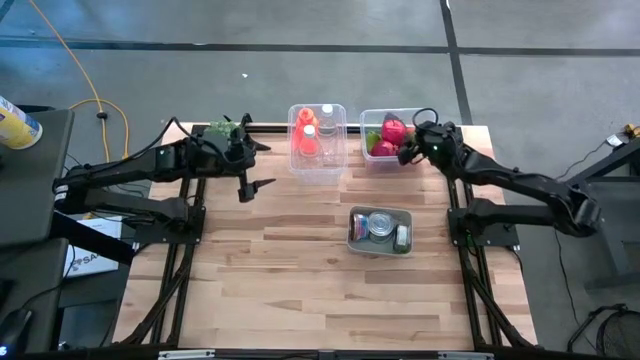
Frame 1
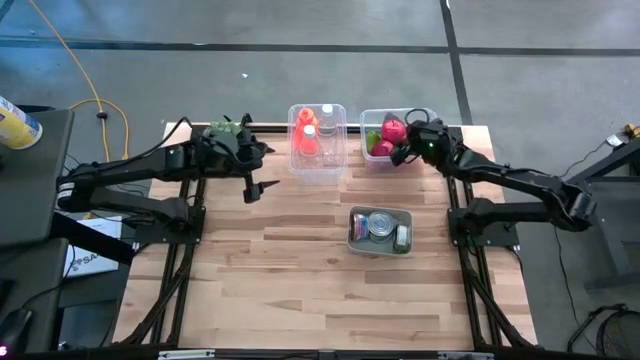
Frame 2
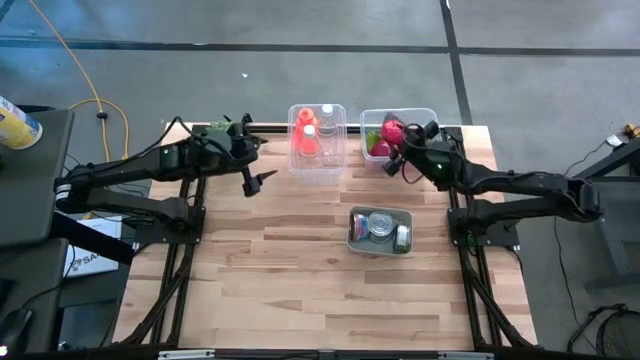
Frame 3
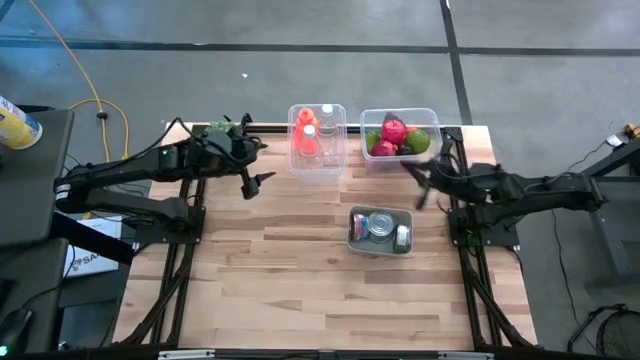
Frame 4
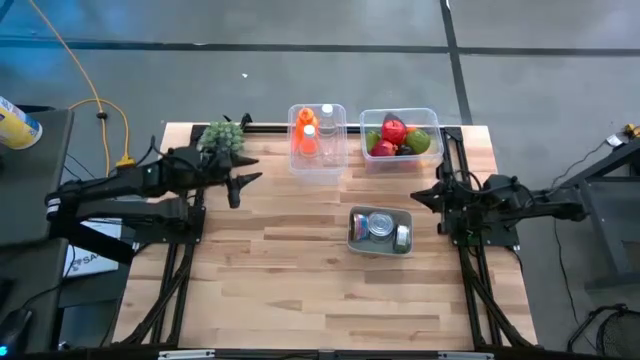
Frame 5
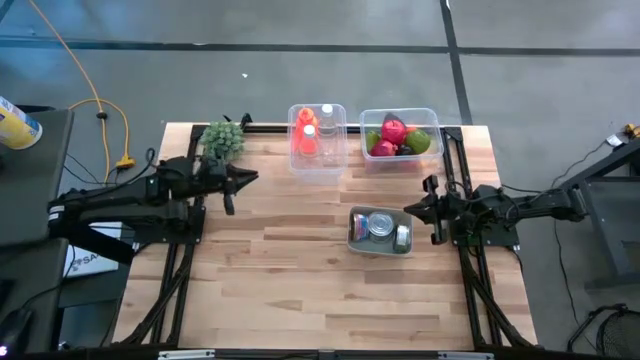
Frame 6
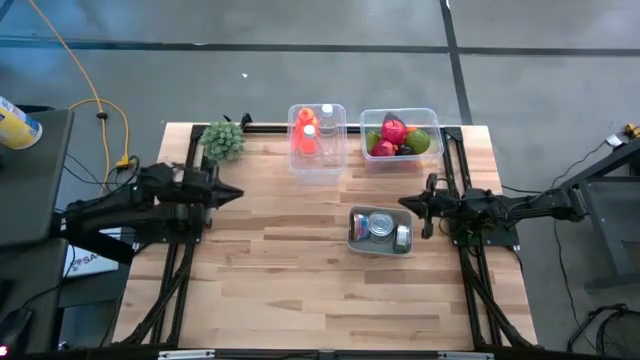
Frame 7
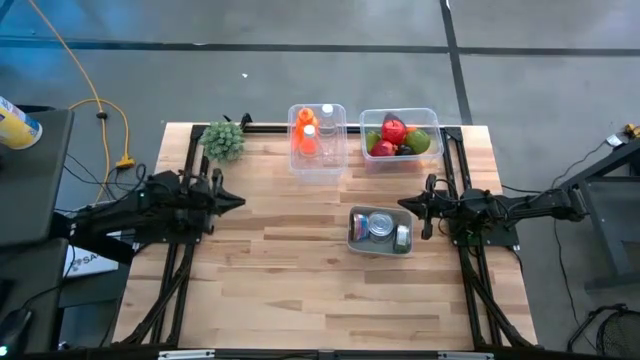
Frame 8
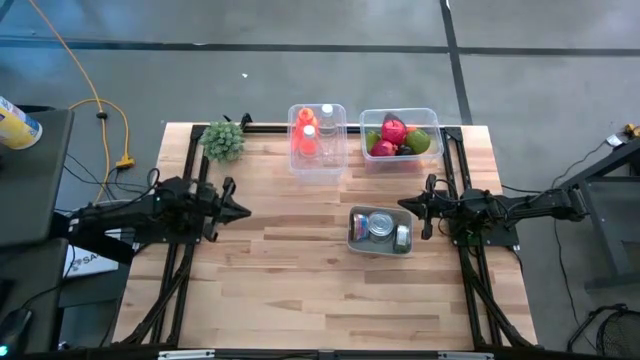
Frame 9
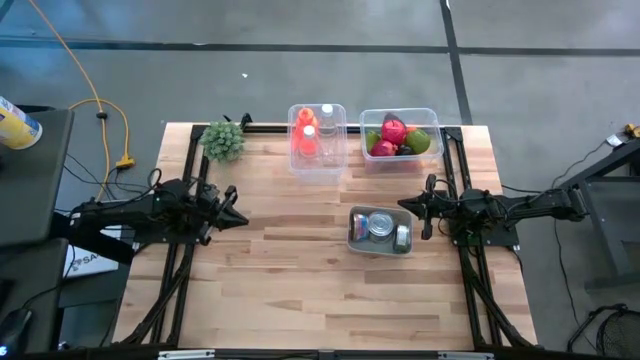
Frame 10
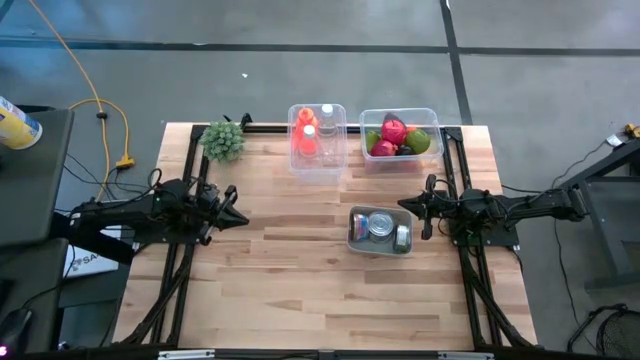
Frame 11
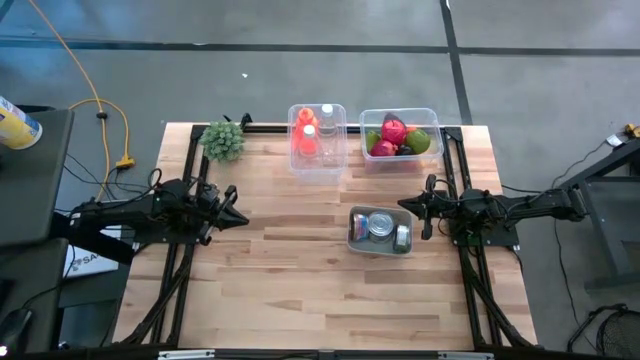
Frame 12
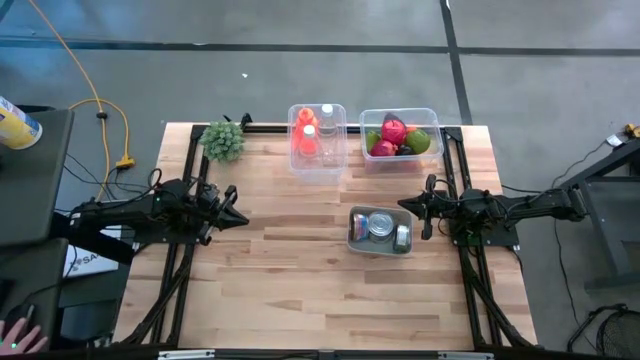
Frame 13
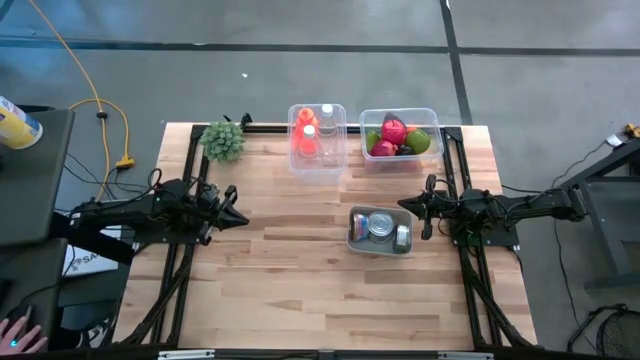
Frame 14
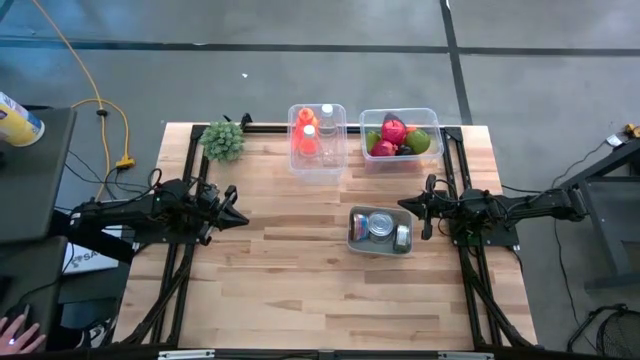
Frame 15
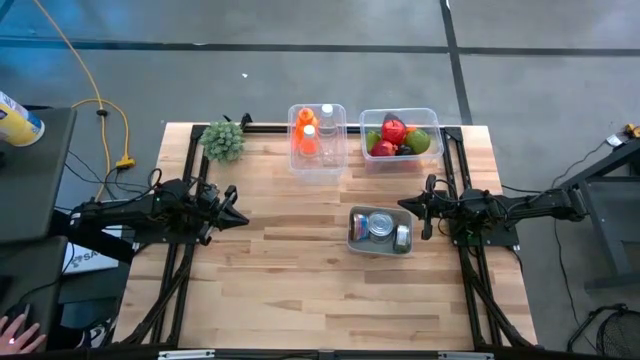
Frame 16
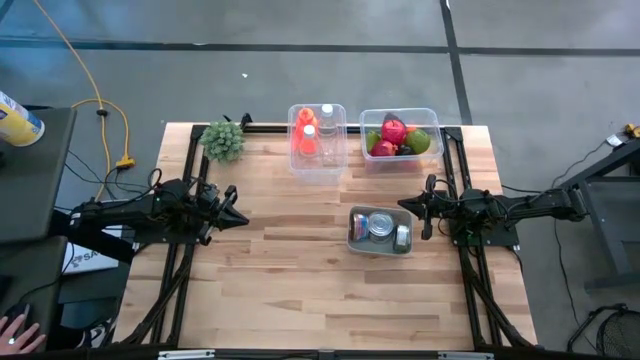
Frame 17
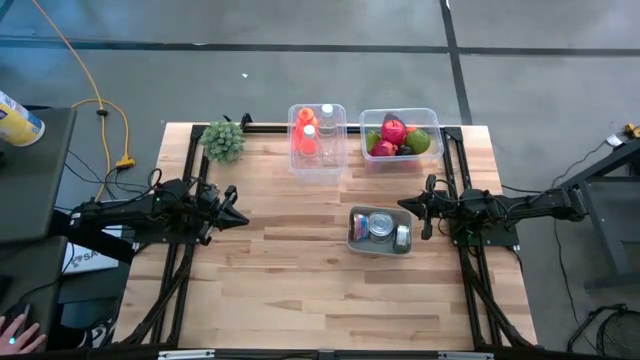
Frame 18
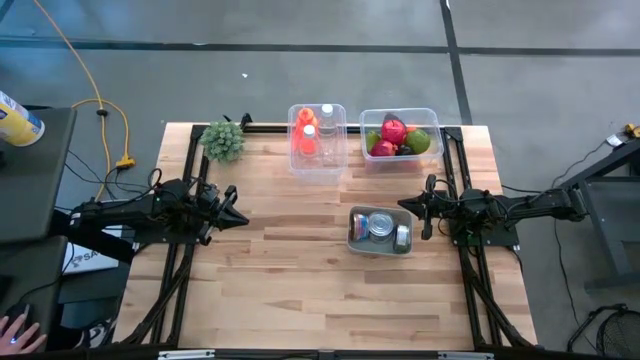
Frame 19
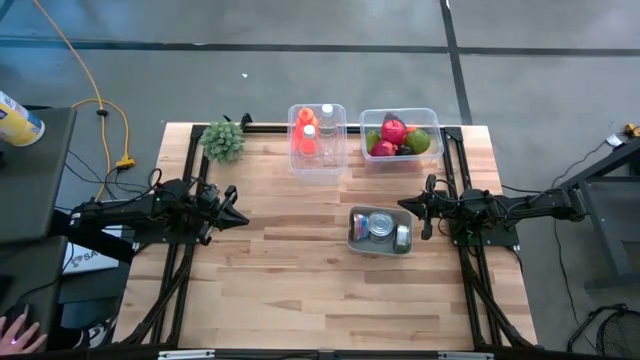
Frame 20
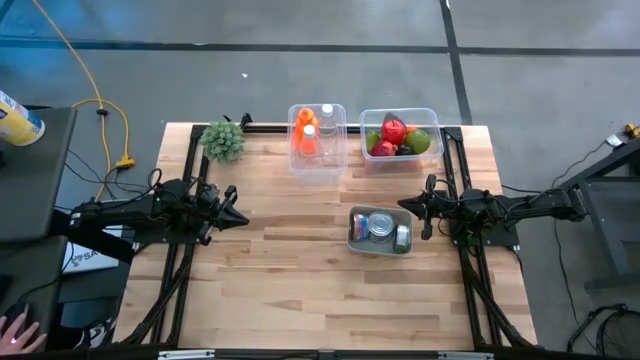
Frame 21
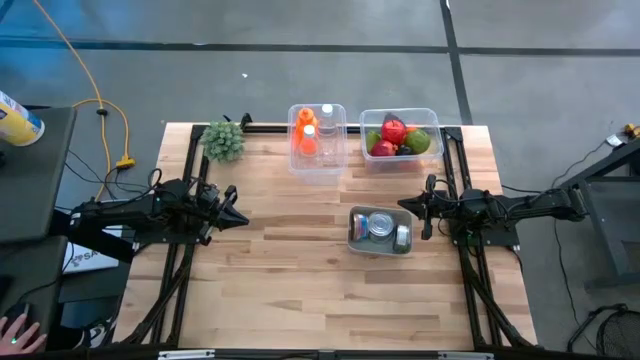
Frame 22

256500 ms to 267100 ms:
Task: Pick & Place Food Item
Return to Home Position

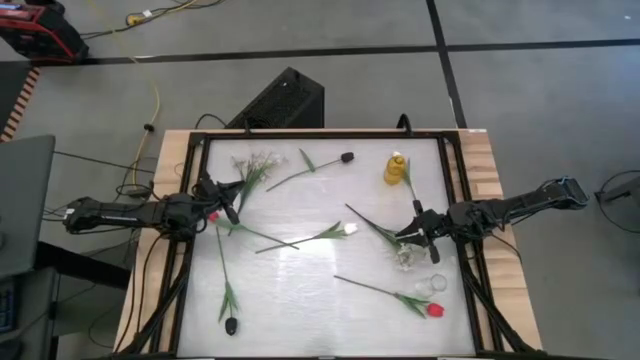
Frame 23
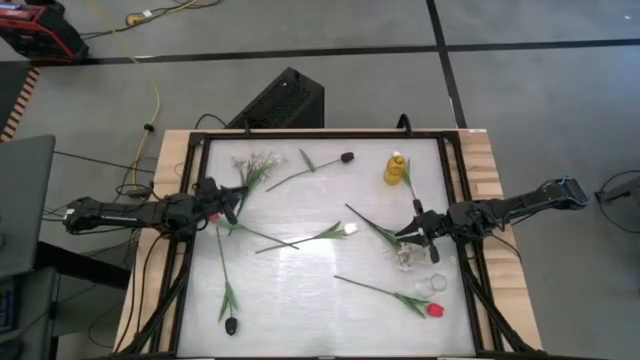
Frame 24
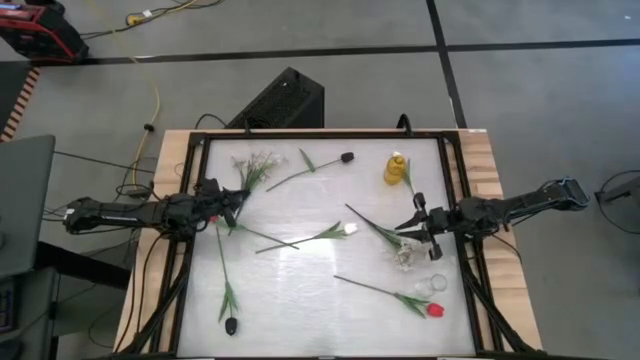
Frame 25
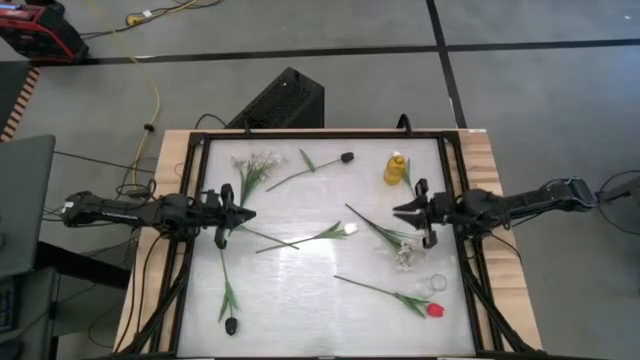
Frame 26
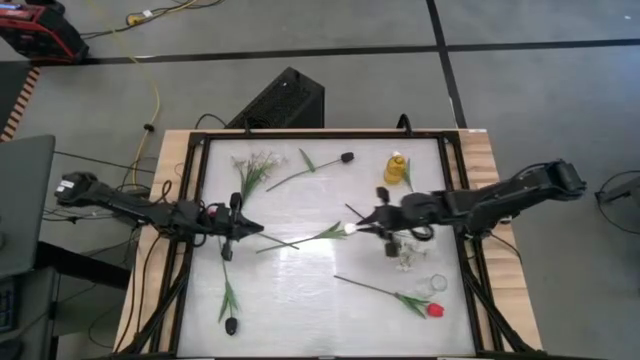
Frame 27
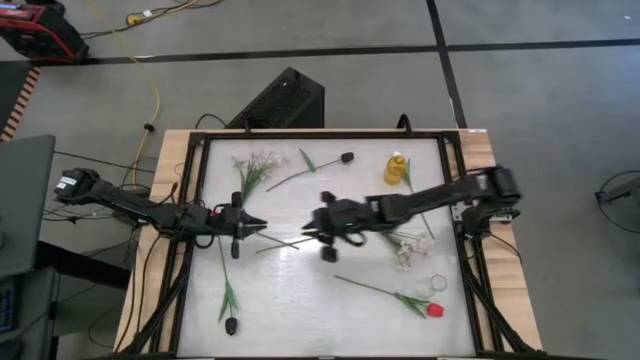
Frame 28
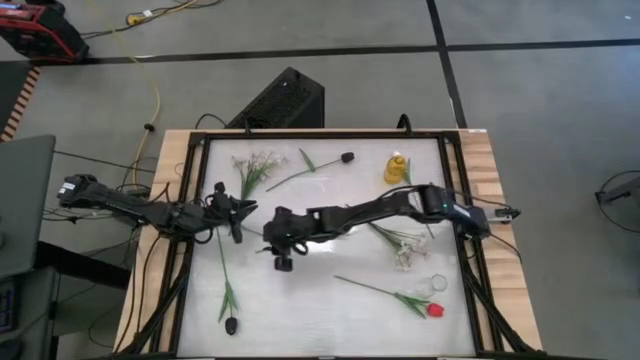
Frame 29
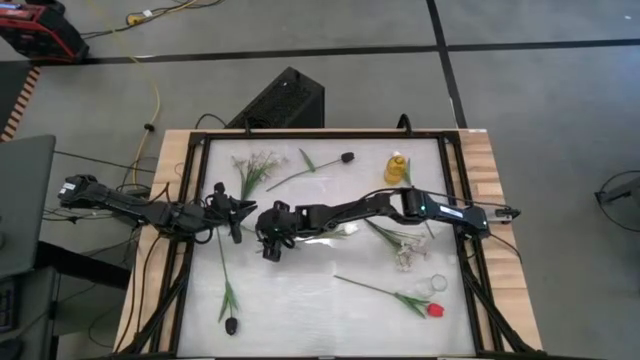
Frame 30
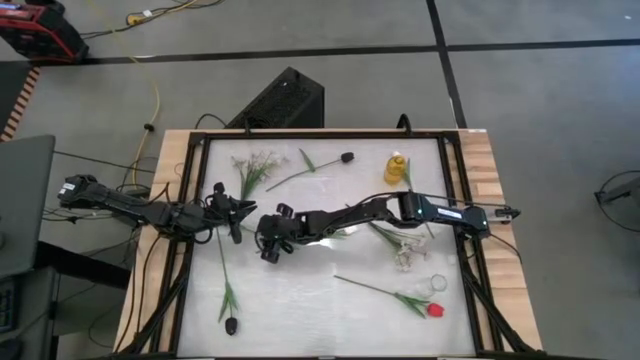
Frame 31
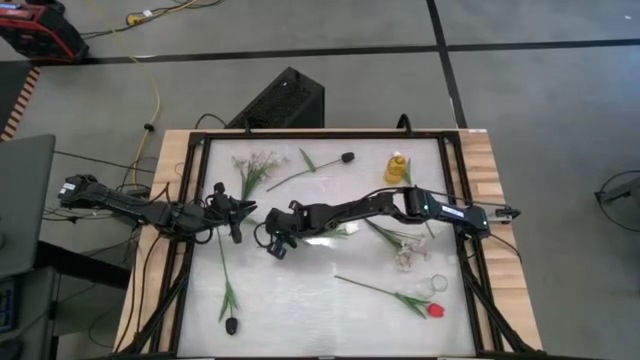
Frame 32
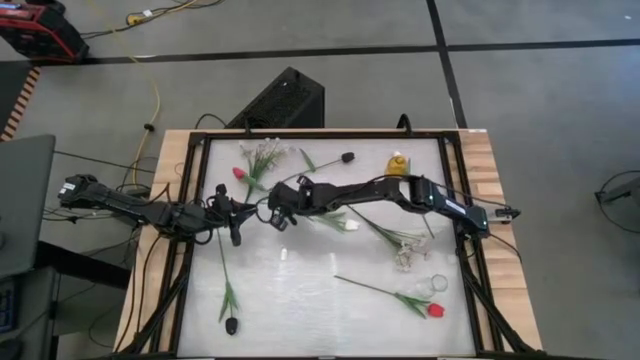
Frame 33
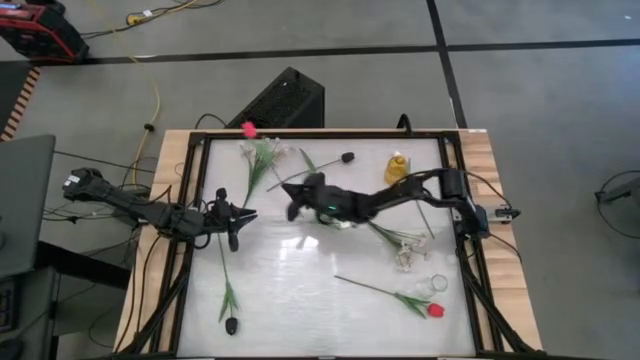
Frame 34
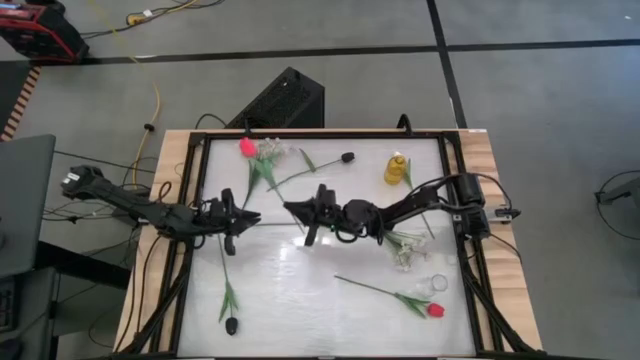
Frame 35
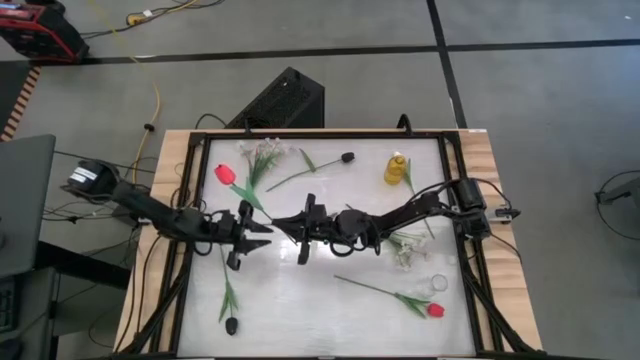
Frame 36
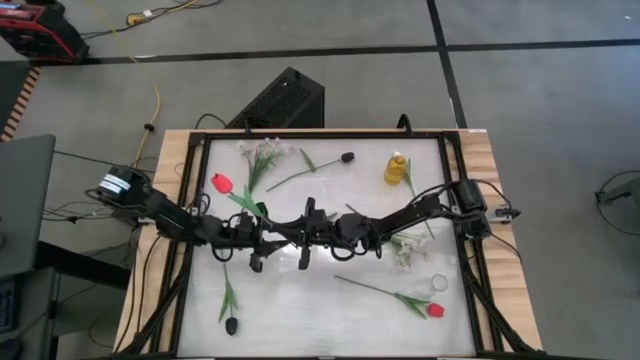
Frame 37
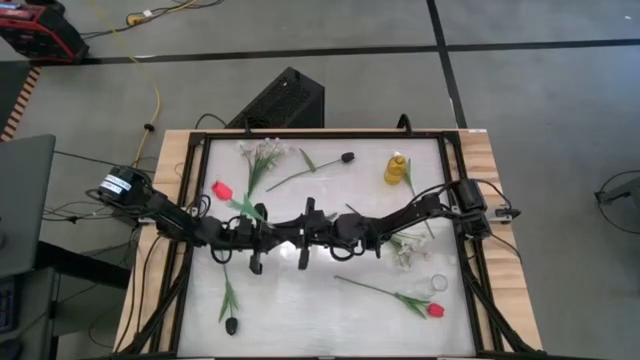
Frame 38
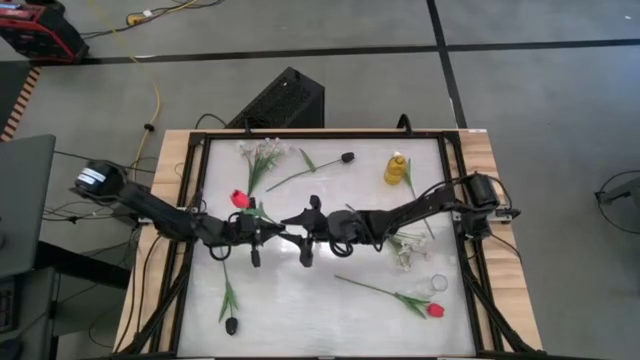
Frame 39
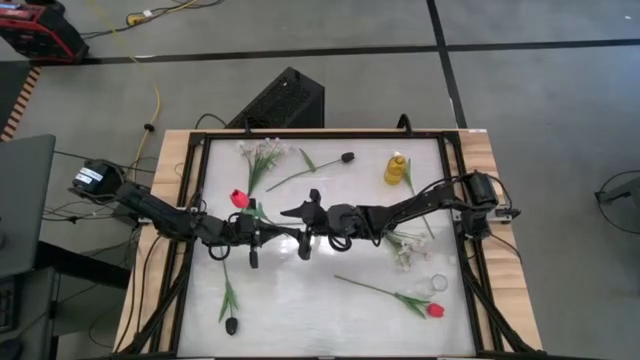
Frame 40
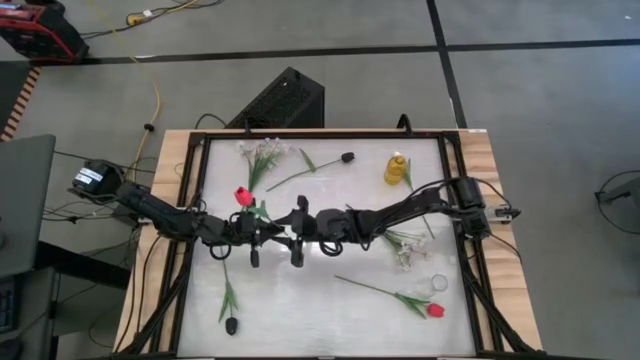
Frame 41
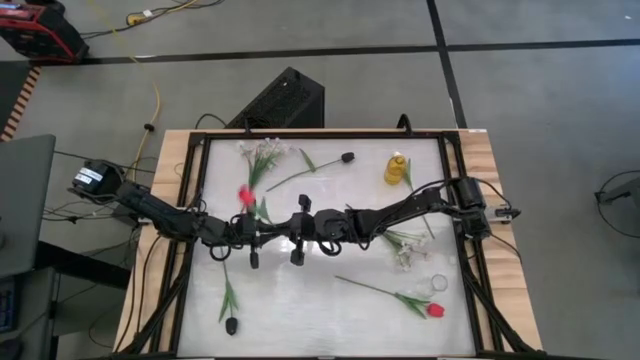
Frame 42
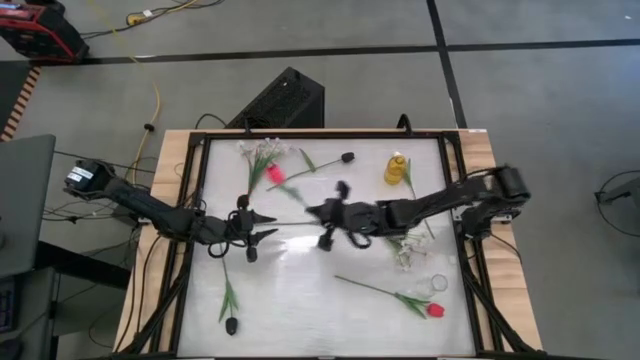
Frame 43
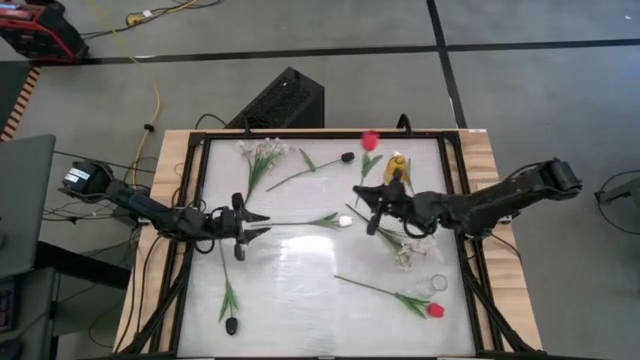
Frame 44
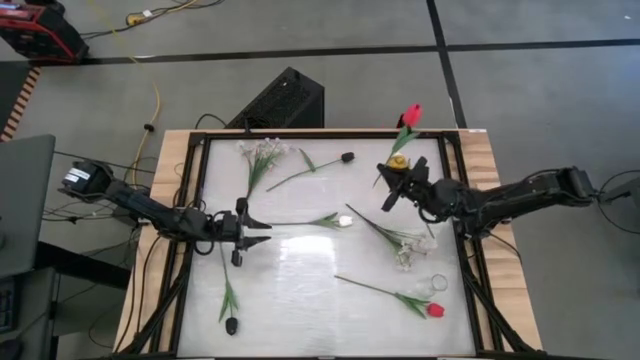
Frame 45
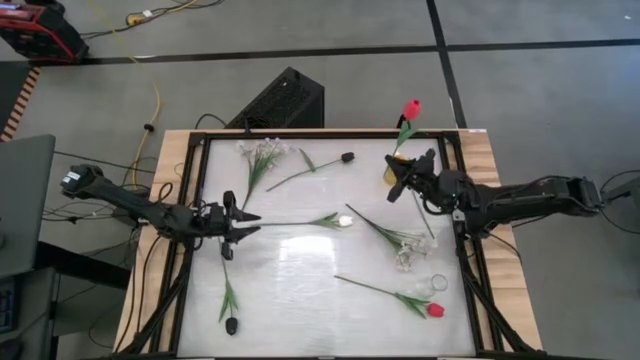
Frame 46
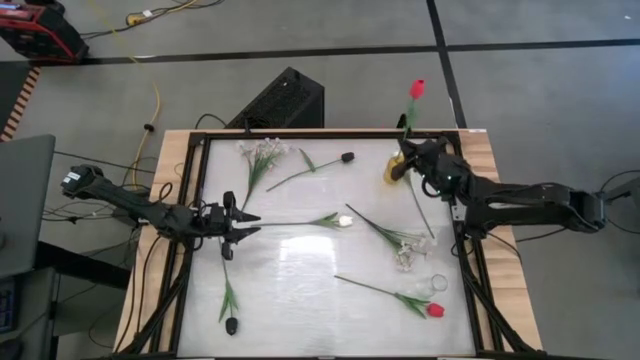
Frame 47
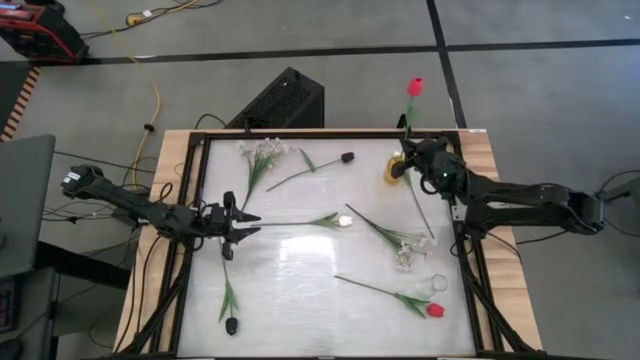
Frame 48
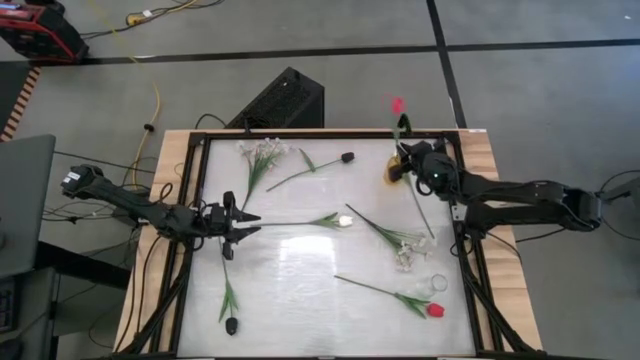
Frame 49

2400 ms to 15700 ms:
Task: Sort flowers into vase by color
Put the top red flower into the yellow flower vase
